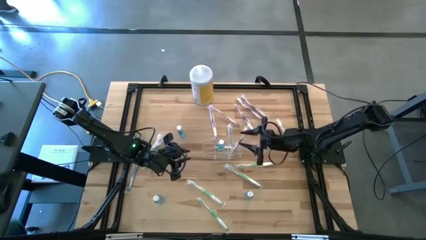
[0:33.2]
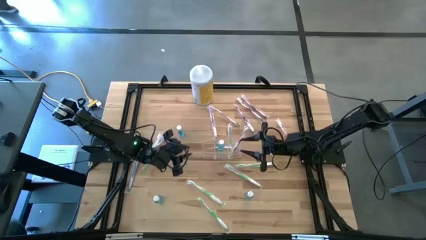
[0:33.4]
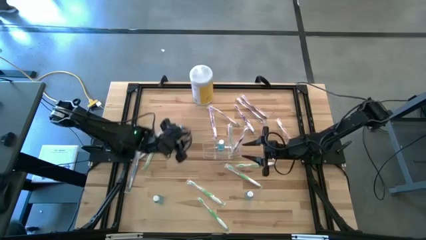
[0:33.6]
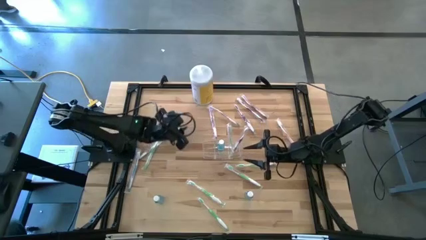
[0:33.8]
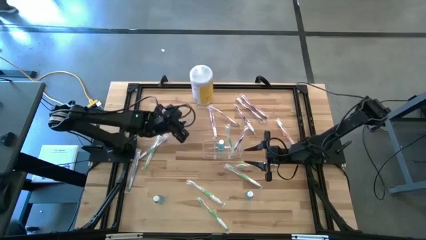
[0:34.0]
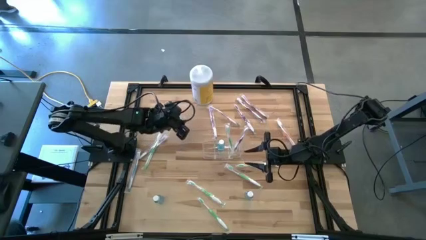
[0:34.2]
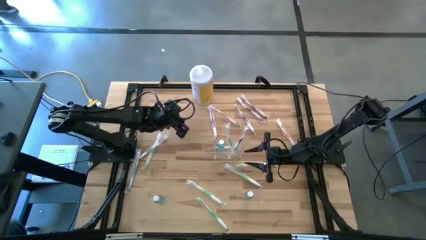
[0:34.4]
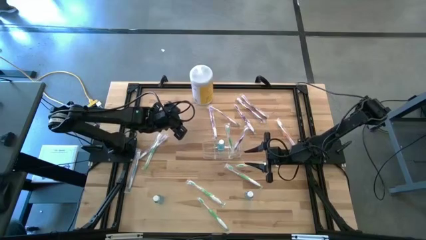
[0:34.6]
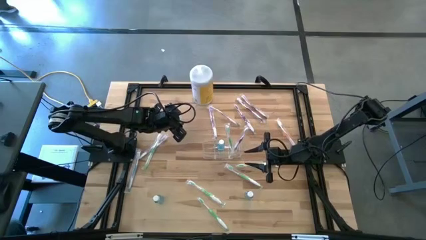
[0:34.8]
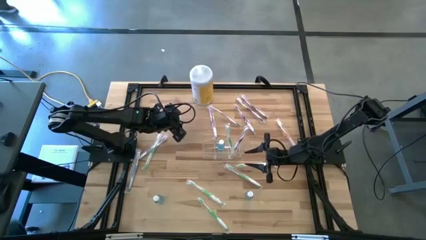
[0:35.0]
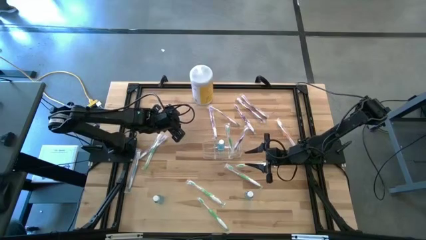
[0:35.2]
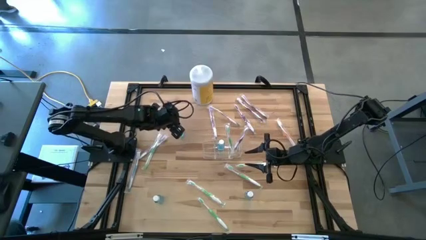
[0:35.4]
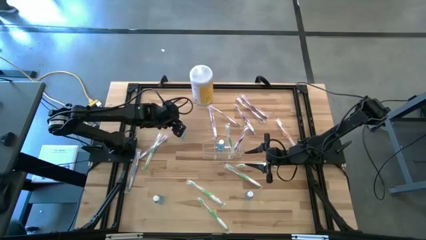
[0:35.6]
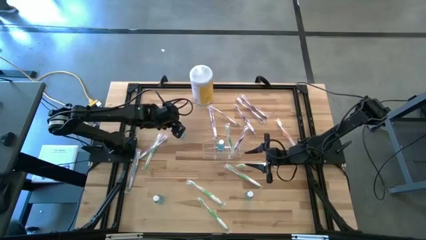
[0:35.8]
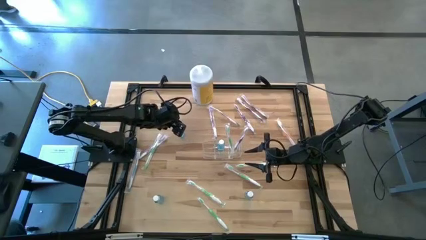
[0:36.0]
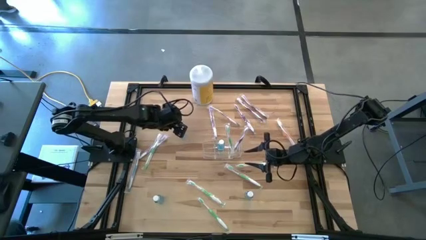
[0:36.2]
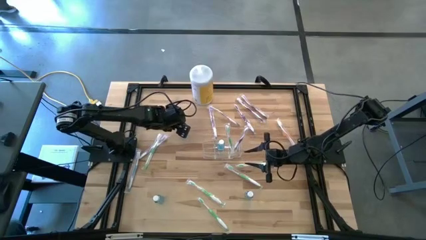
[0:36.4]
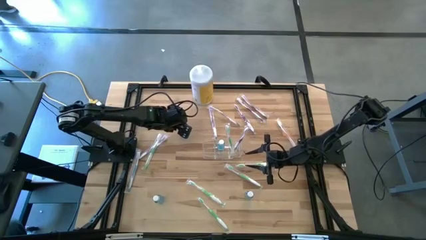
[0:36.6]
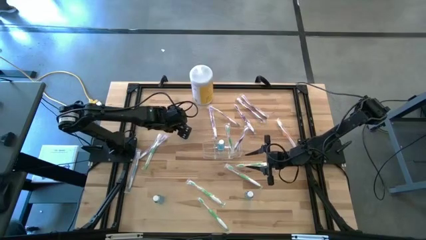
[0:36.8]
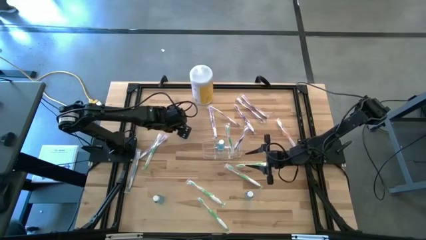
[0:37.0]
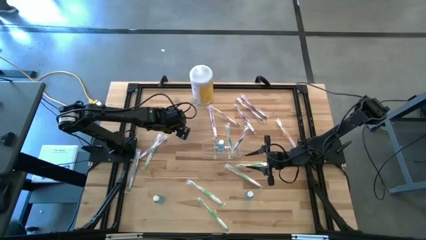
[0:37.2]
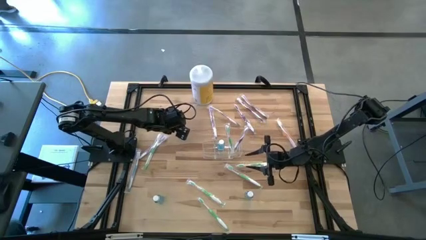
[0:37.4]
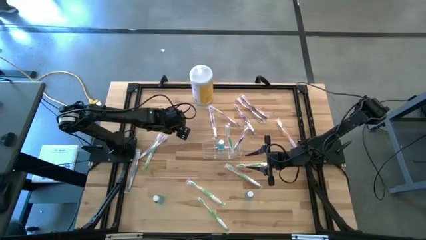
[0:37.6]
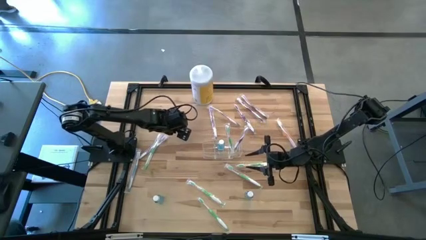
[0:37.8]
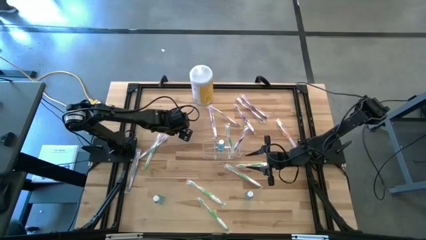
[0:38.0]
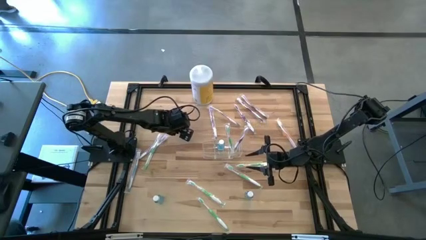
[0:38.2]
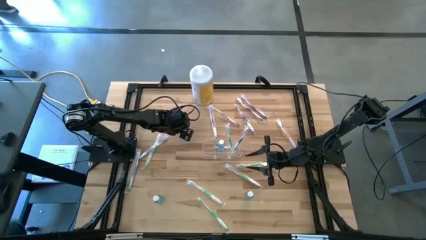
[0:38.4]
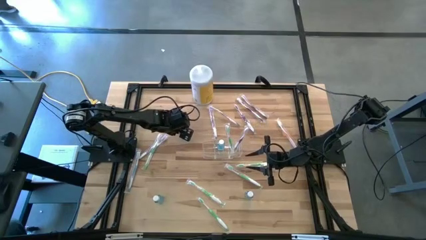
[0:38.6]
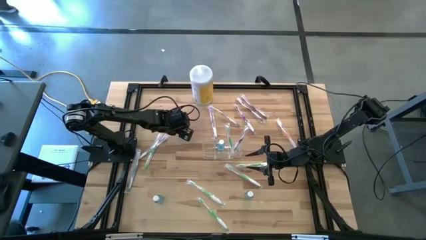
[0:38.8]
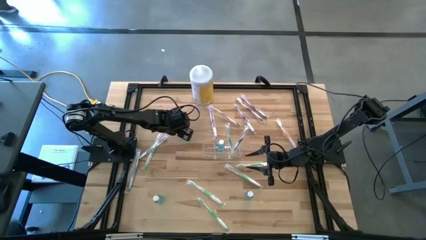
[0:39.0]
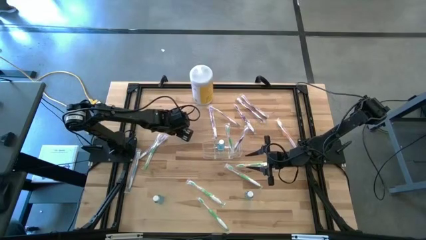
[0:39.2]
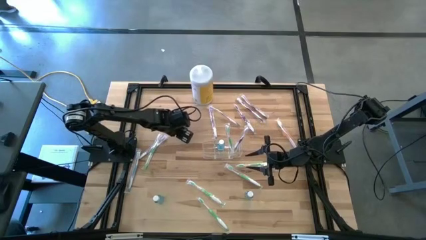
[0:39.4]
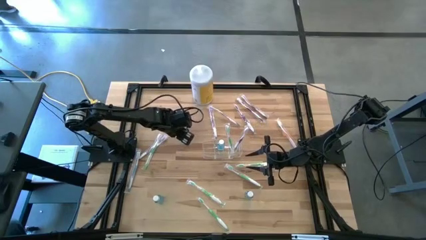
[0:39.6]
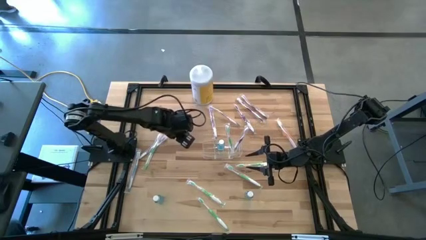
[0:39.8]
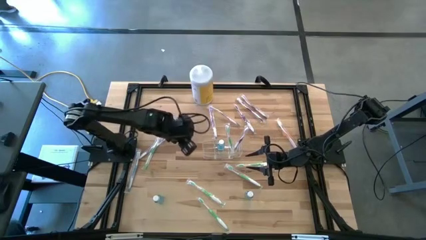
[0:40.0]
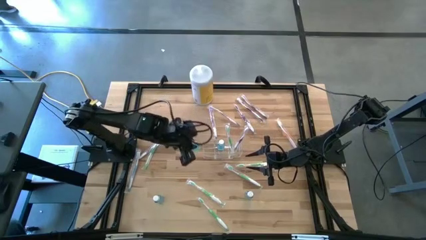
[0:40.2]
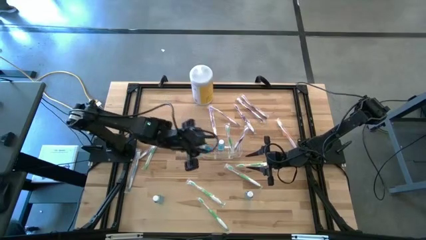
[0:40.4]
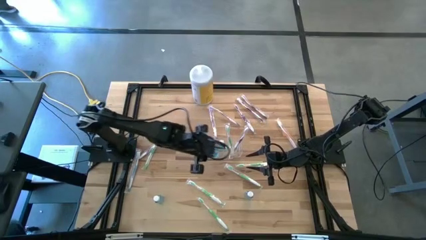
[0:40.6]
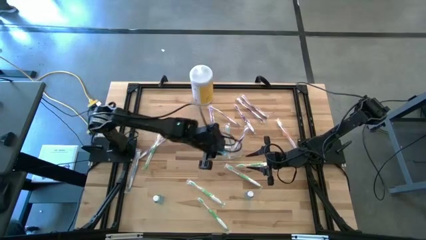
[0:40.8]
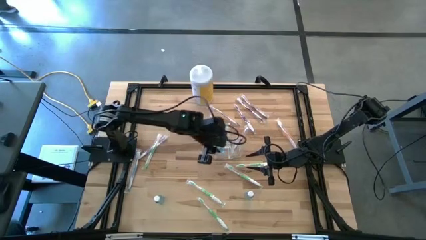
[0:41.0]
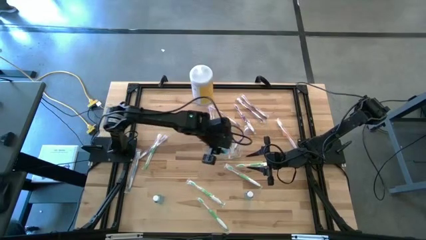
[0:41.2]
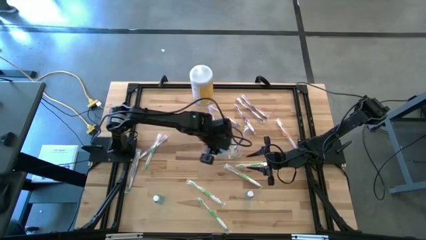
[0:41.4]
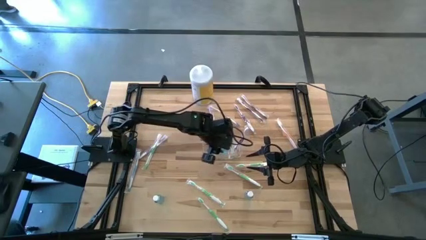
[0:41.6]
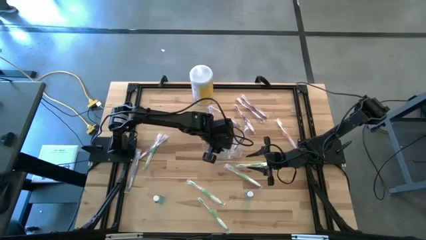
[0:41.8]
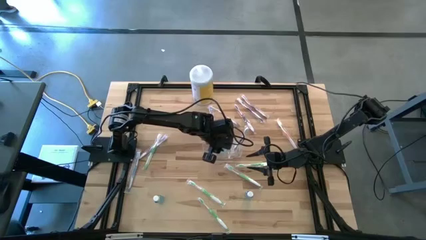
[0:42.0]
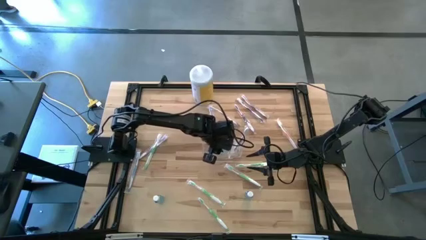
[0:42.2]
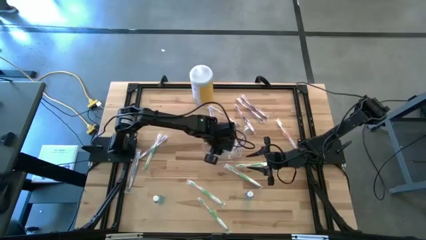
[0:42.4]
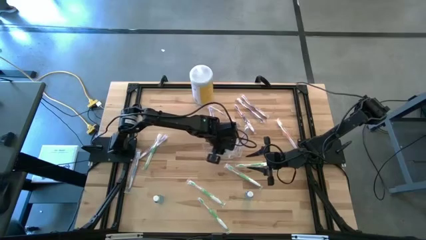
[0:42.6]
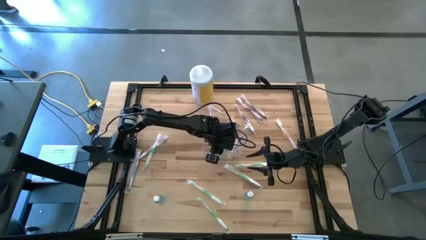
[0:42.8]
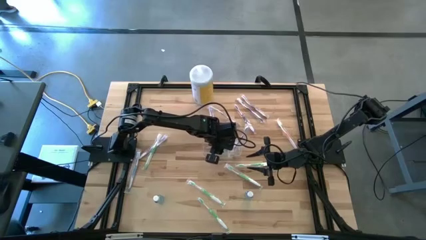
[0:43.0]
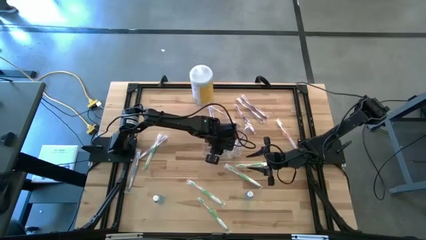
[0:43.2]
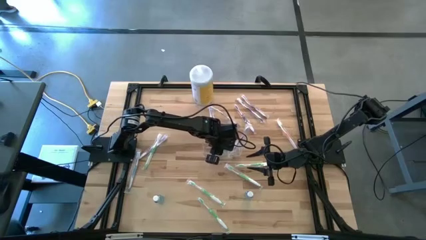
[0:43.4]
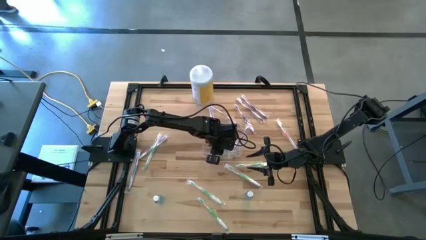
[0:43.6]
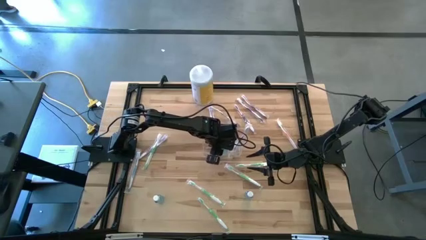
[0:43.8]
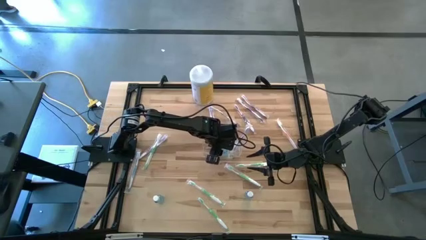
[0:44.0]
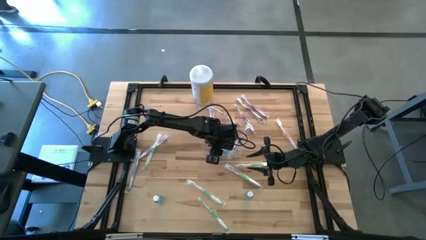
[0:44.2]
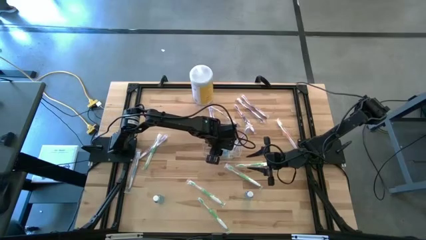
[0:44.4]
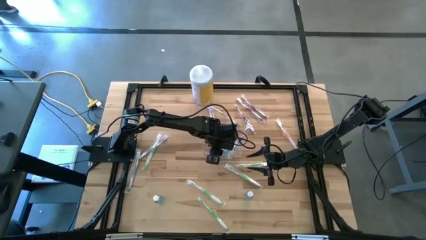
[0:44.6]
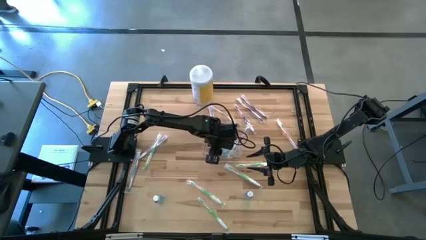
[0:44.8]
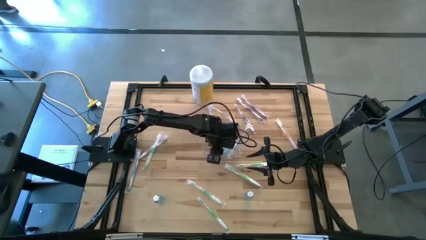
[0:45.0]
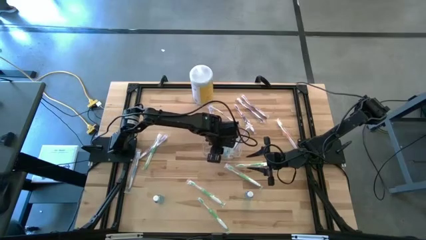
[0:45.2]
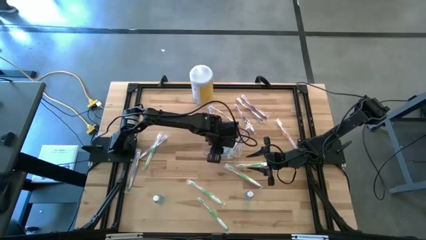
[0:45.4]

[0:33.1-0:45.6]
Task: Pick & Place toothbrushing station
Put the mouthwash bottle into the transparent organizer

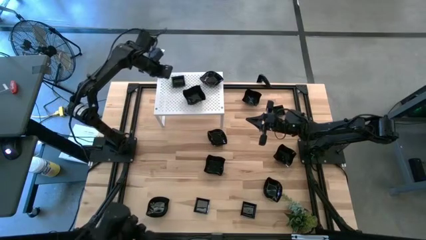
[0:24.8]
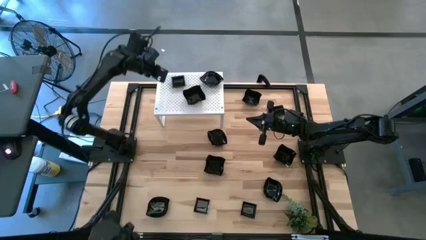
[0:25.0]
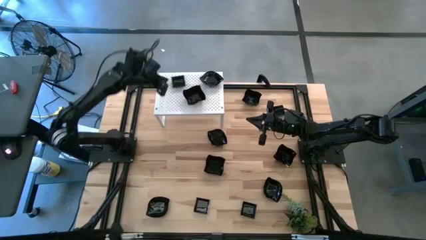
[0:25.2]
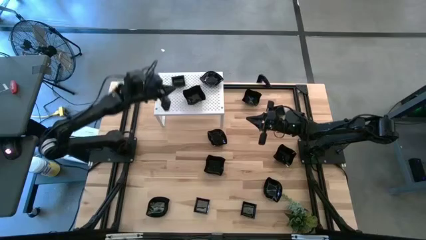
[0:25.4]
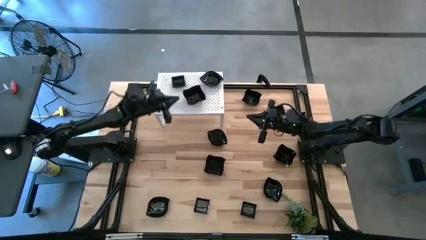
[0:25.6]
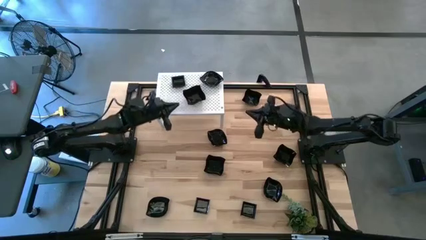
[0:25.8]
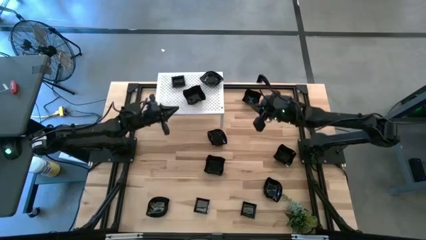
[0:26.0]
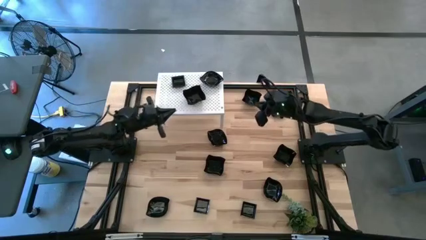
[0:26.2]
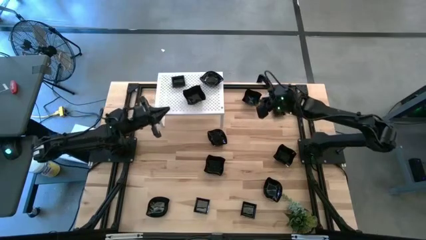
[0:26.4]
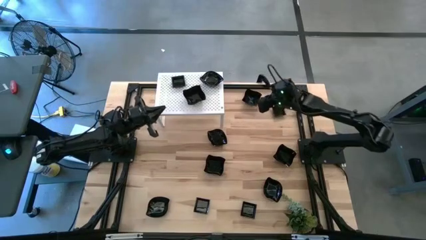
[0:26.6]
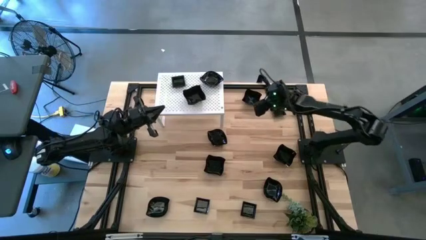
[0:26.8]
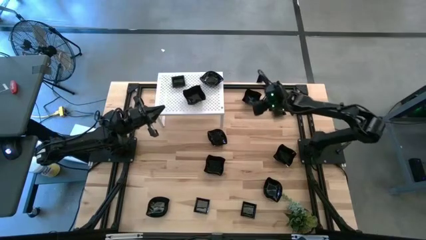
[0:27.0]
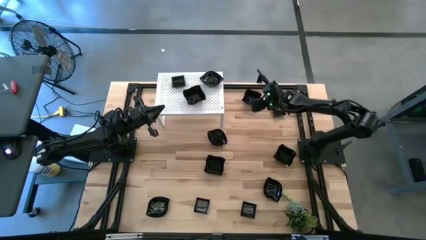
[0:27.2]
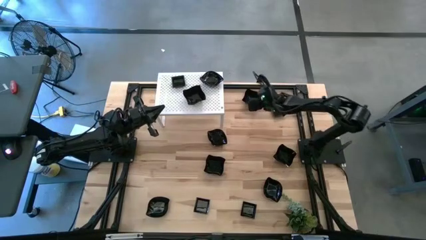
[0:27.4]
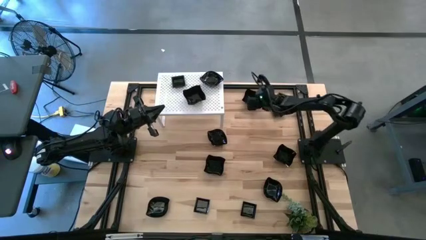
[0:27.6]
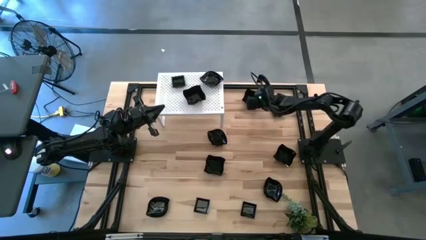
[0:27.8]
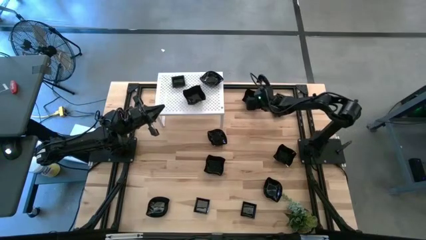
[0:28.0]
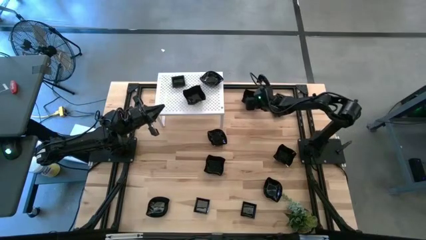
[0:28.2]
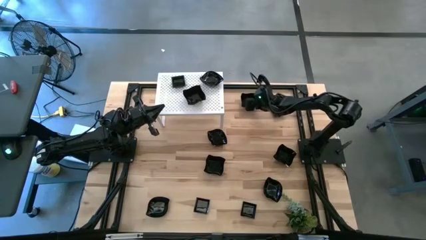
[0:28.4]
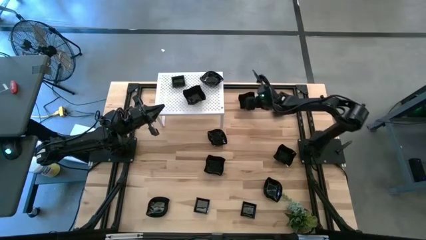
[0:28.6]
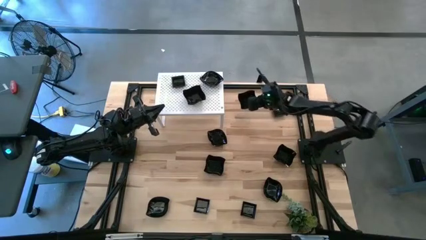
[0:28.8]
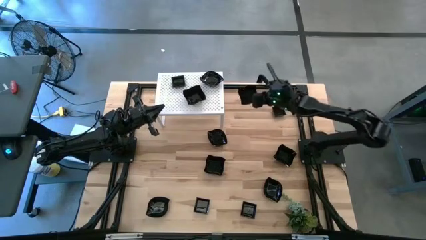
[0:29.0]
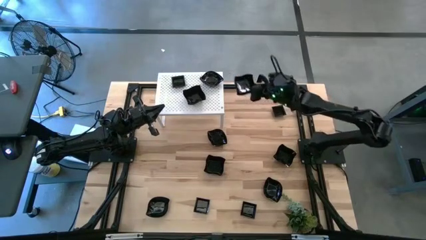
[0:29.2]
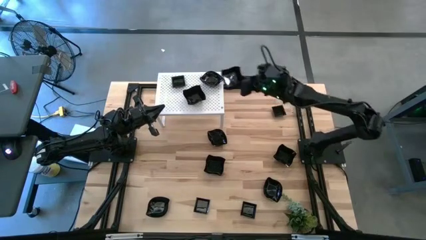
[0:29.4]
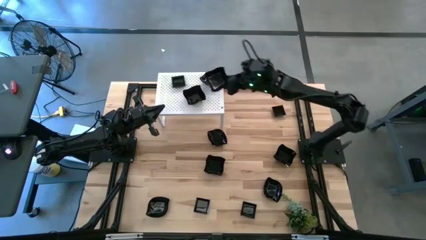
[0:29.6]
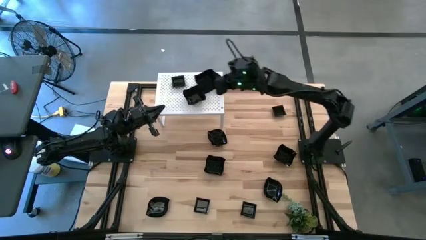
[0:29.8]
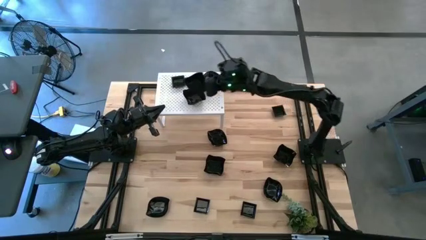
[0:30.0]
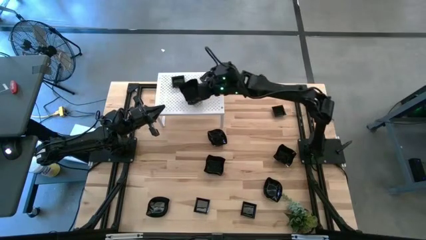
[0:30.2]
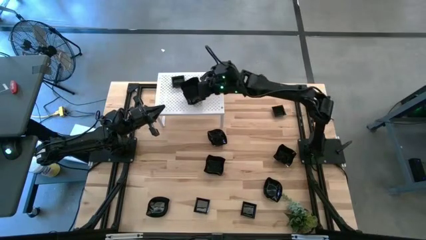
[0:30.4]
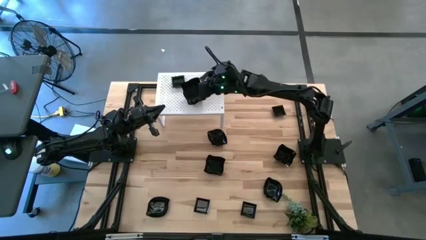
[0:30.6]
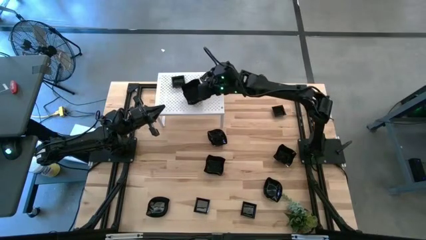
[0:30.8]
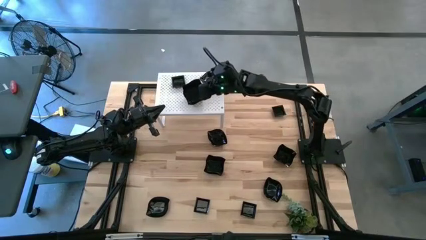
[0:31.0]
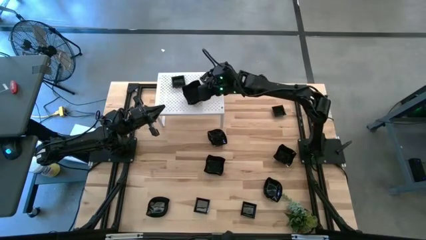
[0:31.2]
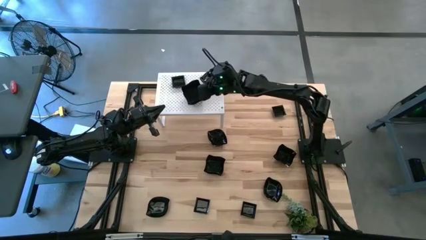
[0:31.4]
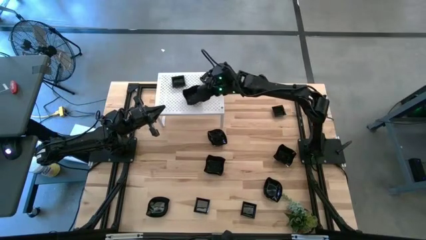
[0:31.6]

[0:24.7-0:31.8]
Task: Pick & Place Mini shaped plates
Stack the black distorted square plate on top of the black distorted square plate on the shelf
